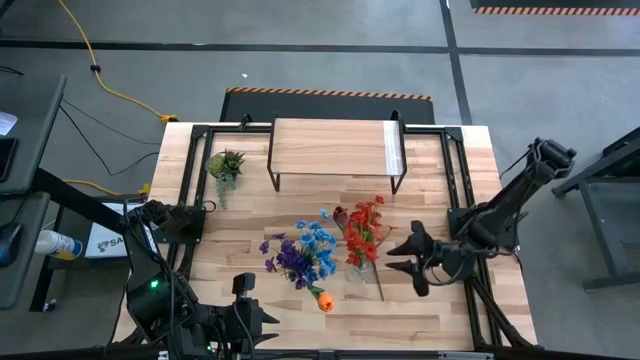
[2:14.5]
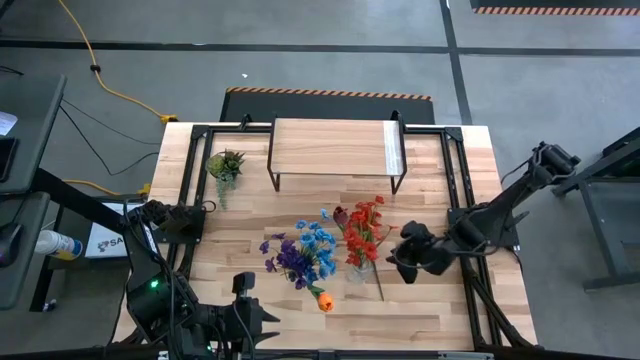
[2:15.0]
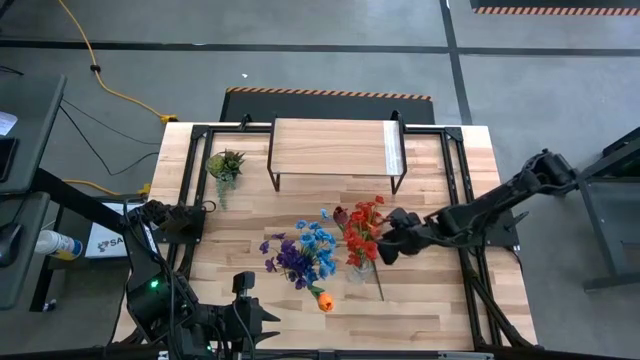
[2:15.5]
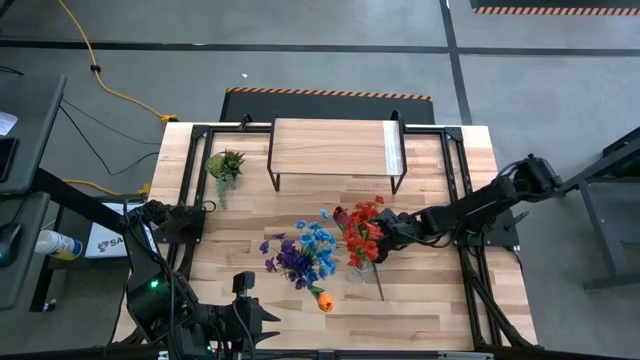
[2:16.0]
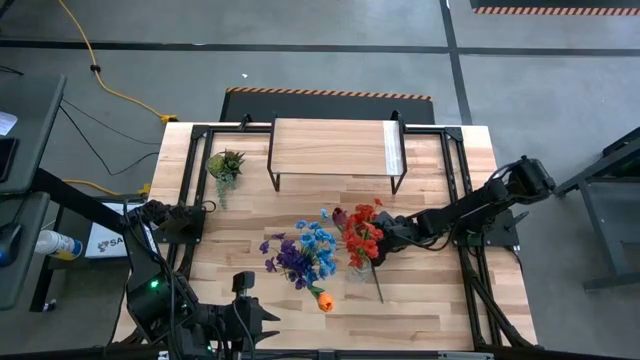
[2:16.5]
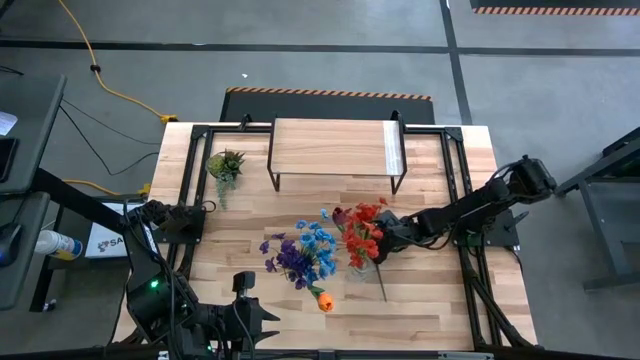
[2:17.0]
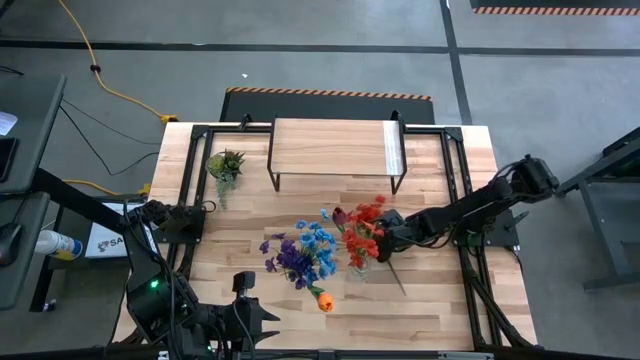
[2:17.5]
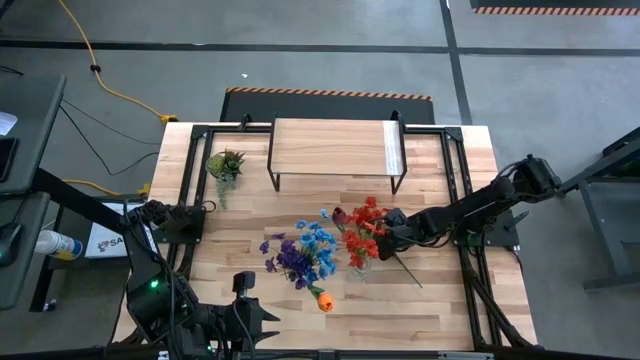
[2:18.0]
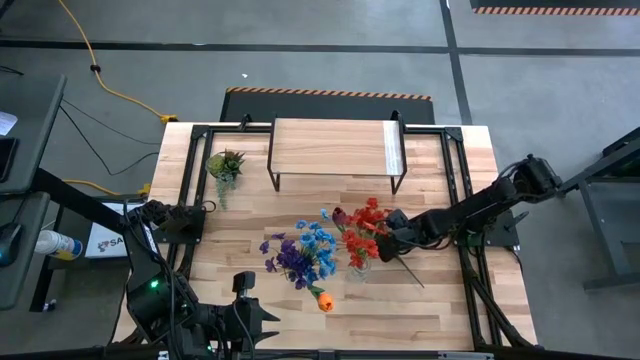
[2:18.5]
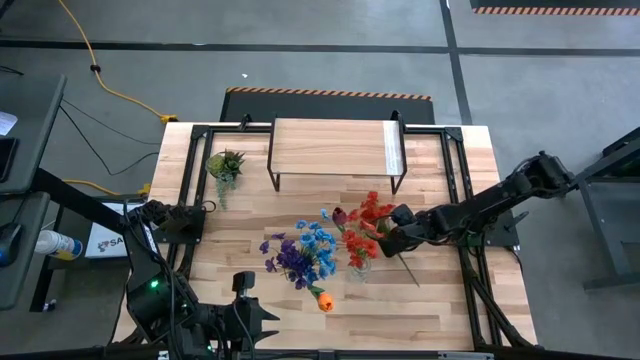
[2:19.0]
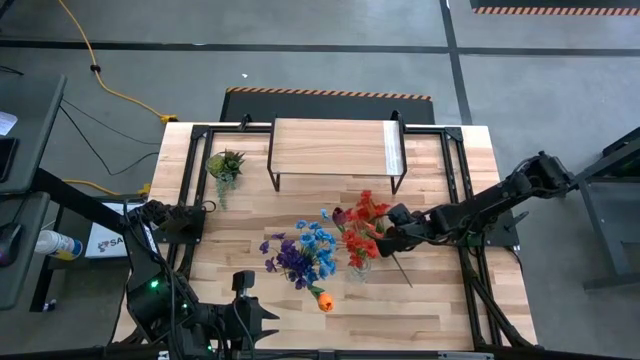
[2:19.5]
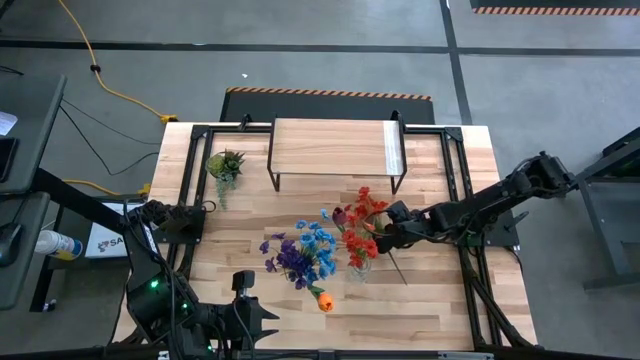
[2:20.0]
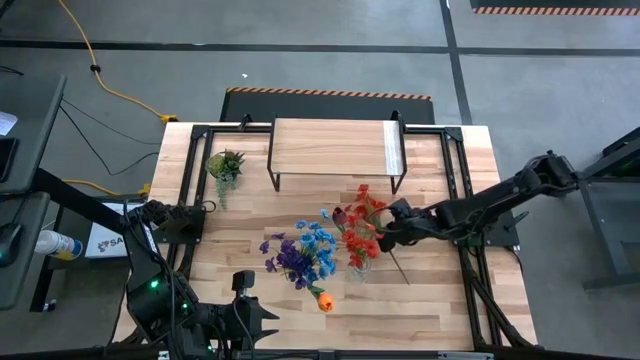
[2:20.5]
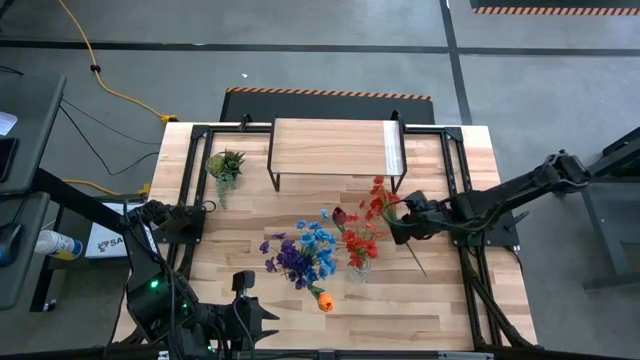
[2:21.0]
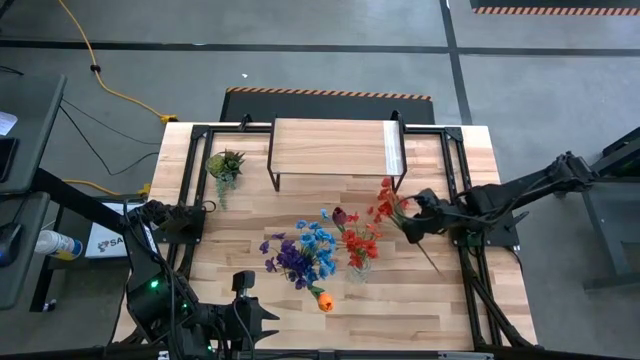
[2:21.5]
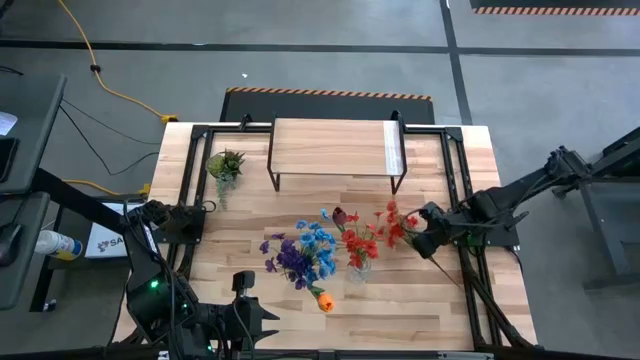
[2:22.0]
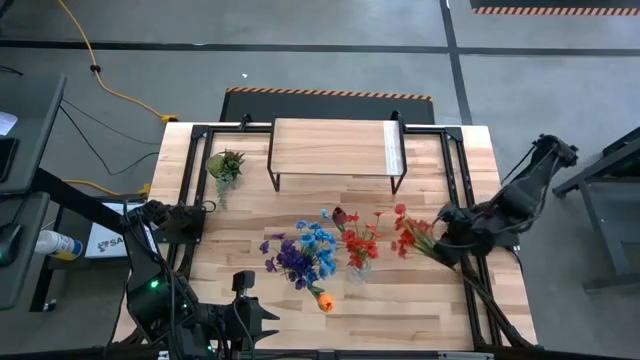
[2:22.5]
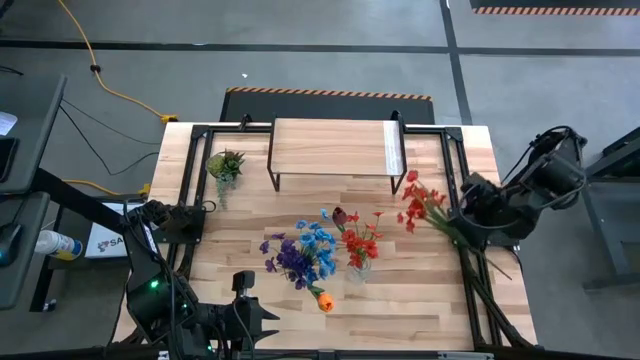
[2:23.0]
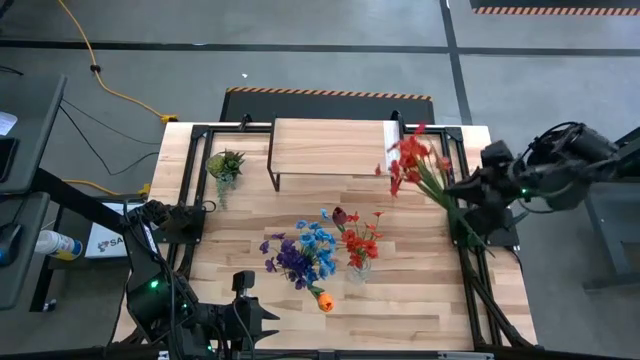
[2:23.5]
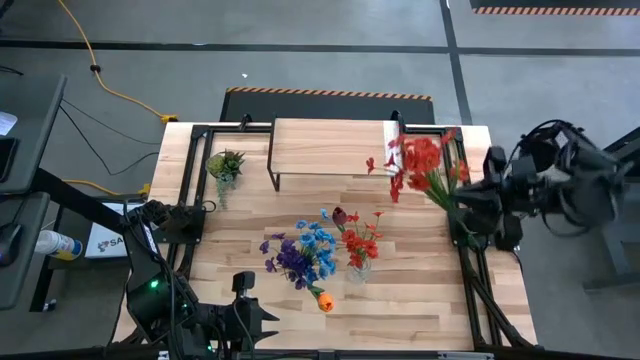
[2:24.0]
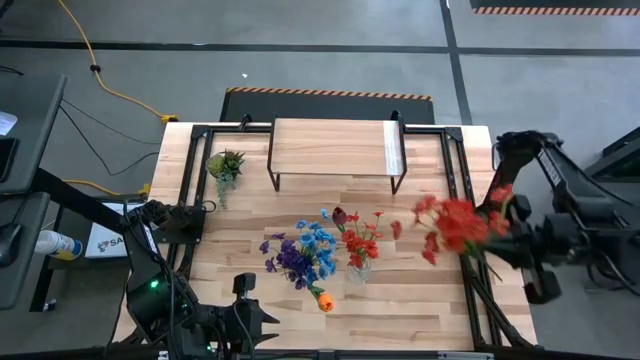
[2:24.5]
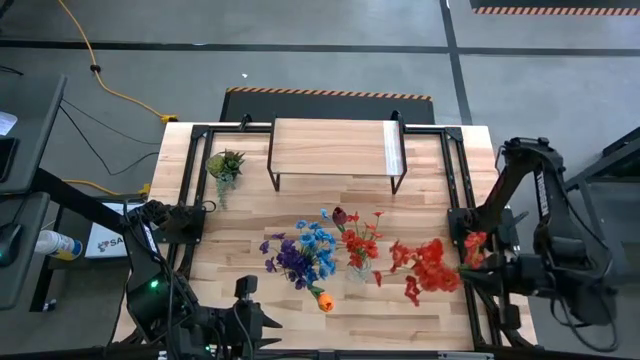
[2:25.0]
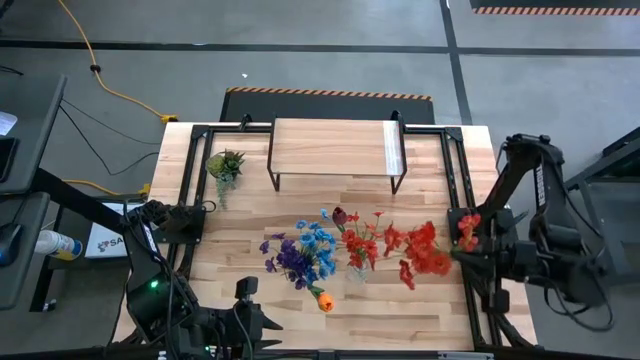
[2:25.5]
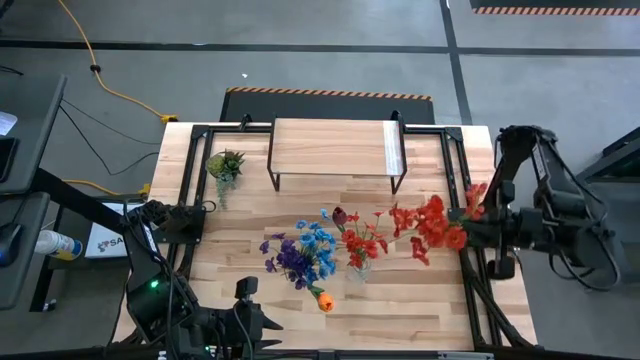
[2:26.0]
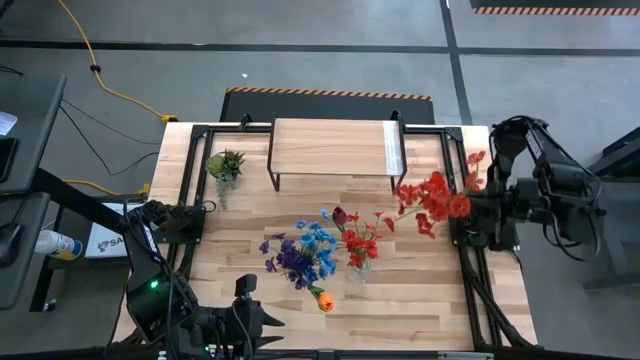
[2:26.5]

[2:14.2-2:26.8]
Task: Pick and place flowers into a vace then onto a shelf
Put the orange flowers into the right transparent flower vase

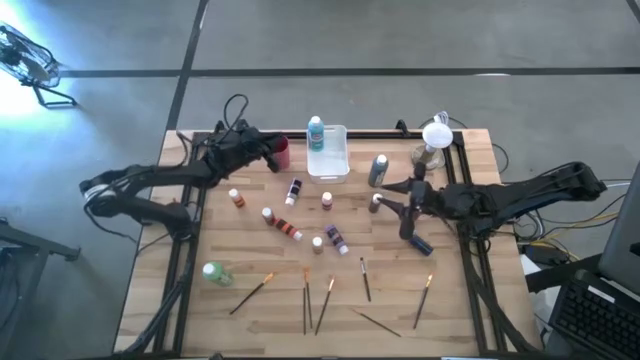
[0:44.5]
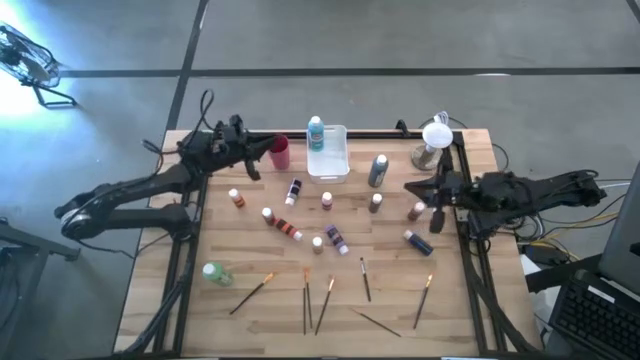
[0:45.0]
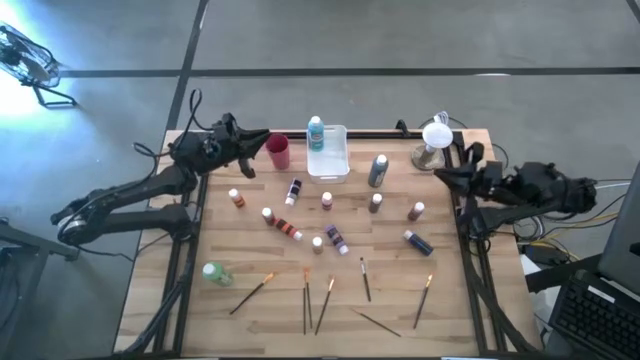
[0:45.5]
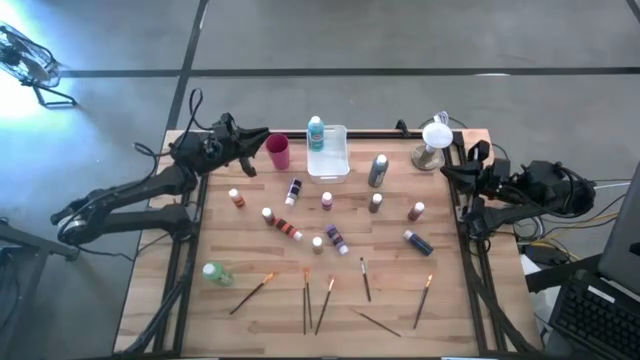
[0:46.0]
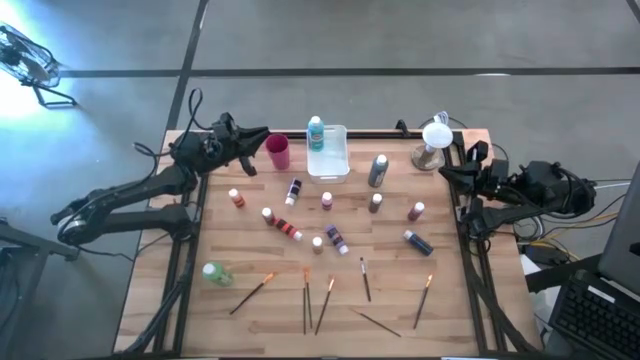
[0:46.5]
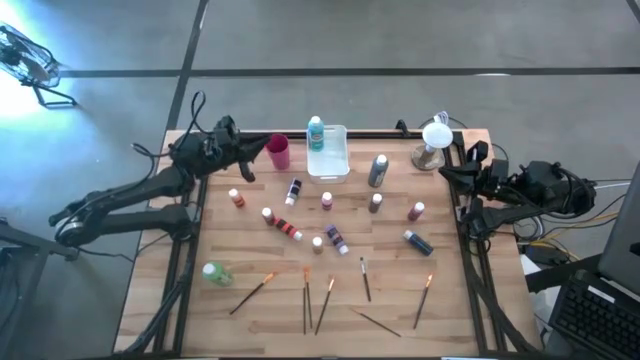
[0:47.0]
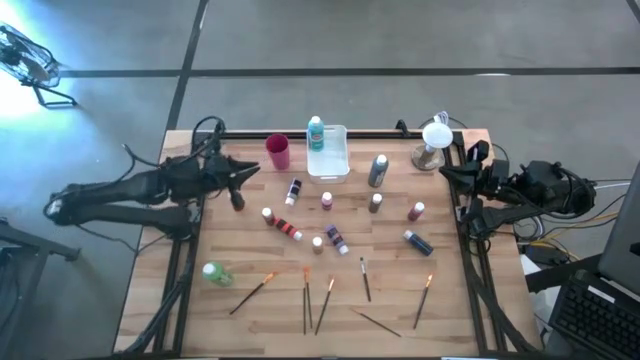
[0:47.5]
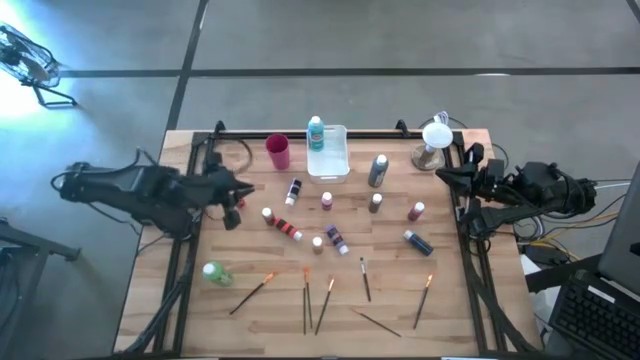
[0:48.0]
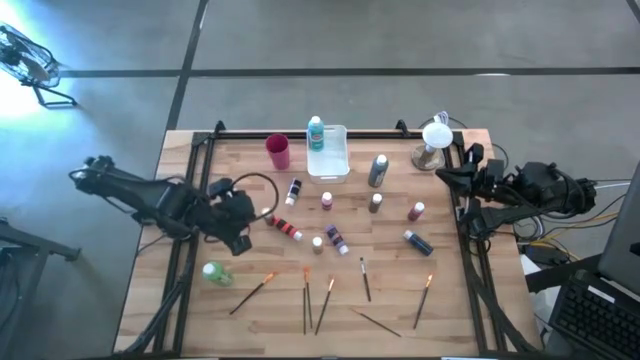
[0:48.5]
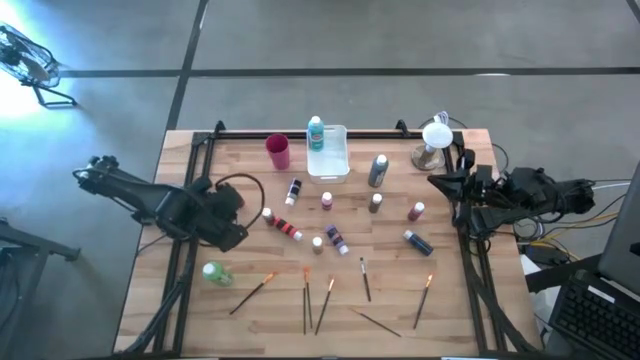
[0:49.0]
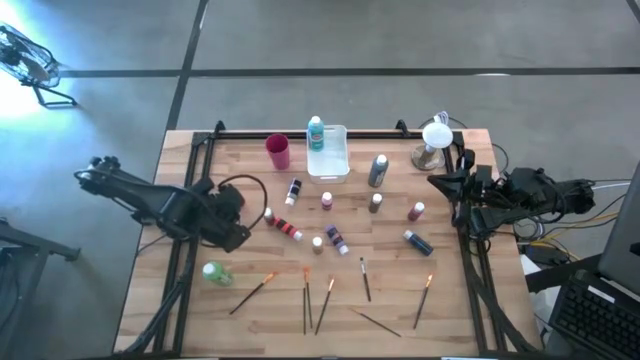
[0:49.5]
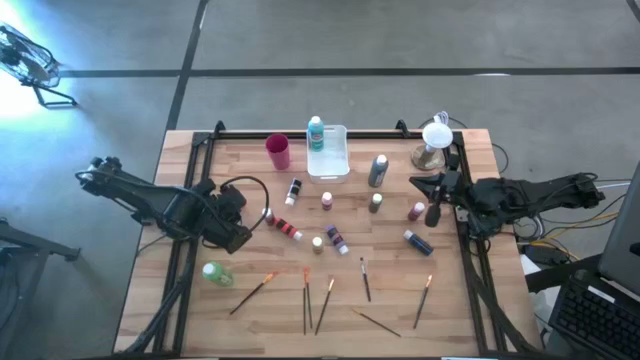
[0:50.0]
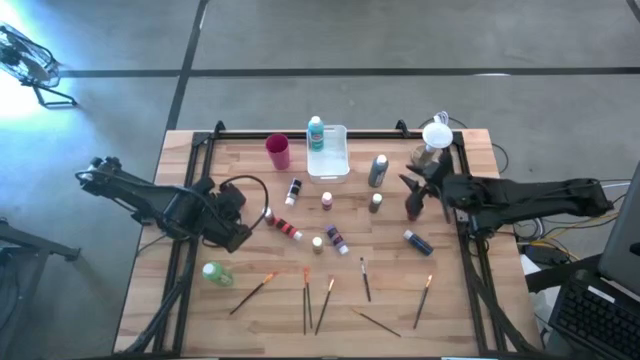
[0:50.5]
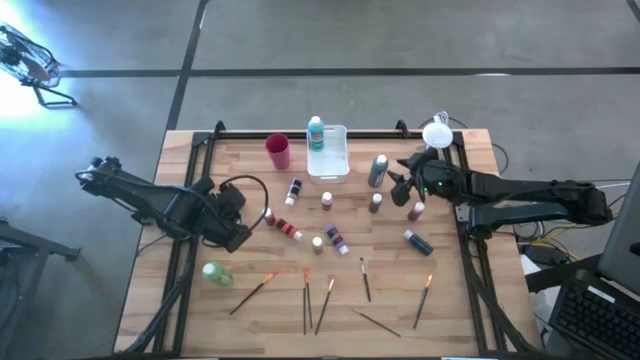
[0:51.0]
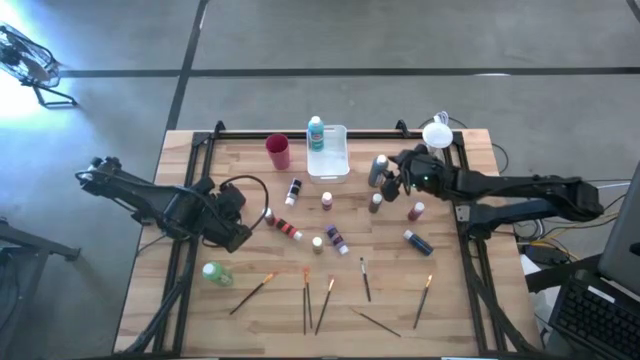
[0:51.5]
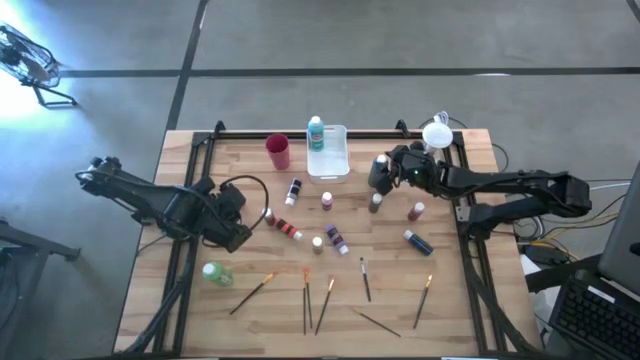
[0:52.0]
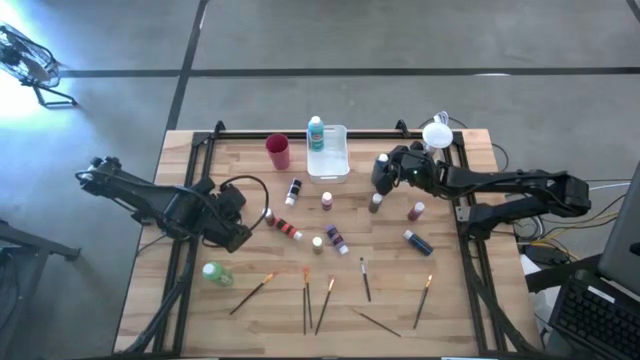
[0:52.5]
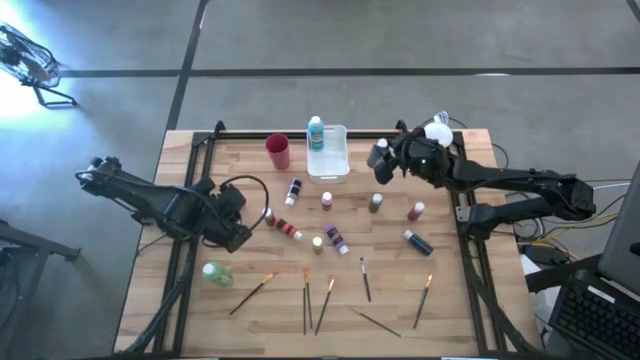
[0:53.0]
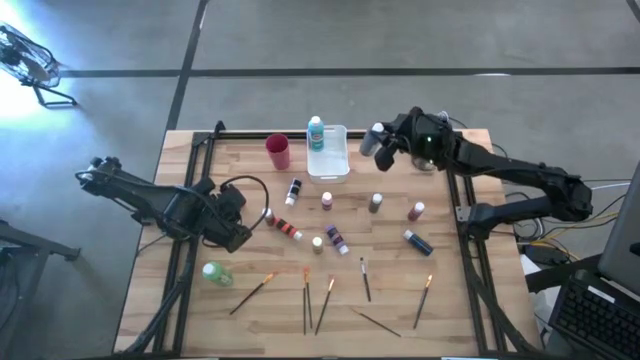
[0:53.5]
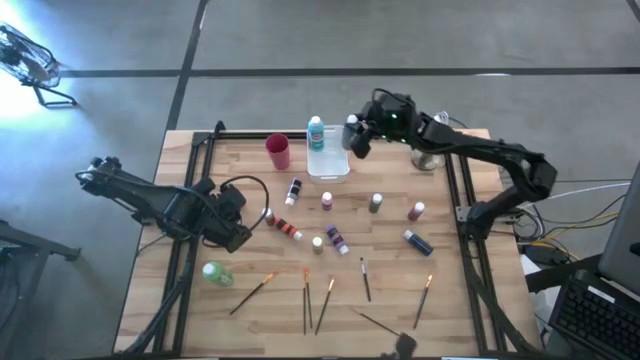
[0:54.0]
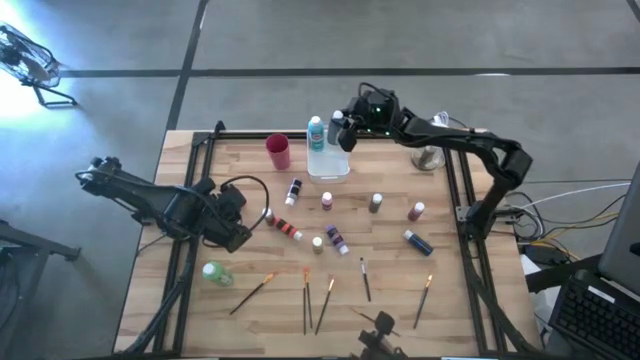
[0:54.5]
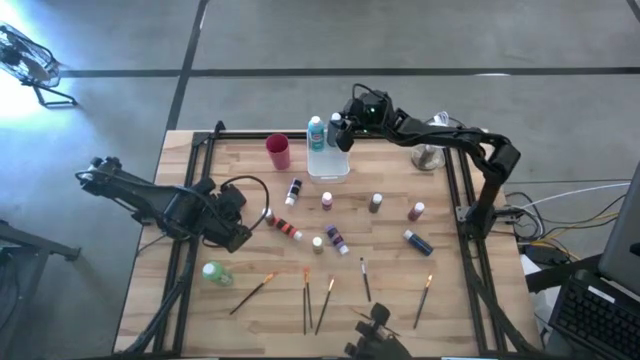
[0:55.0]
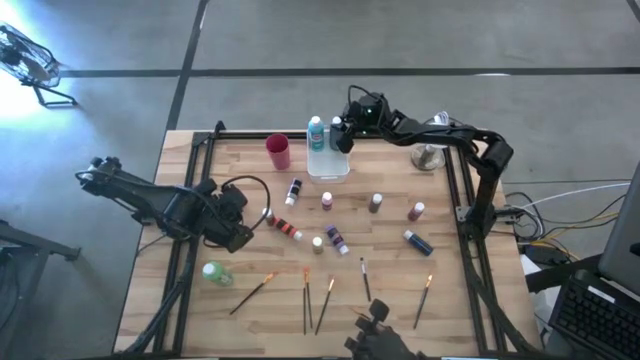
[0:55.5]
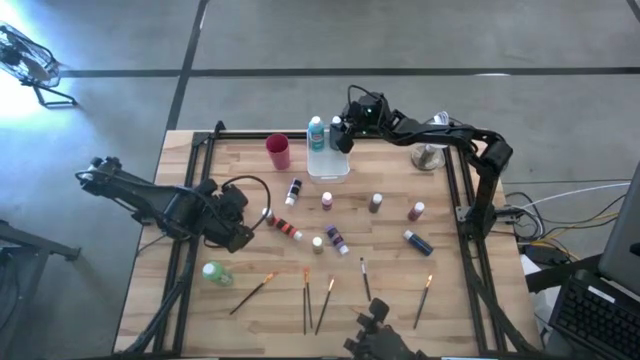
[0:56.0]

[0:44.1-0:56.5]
Task: Pick & Place Paint Supplies
Put the black paint bottle into the white bin
